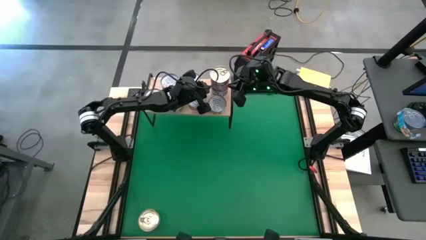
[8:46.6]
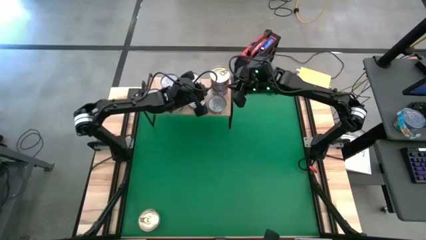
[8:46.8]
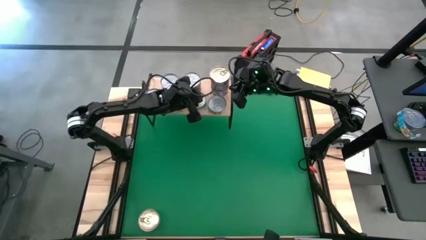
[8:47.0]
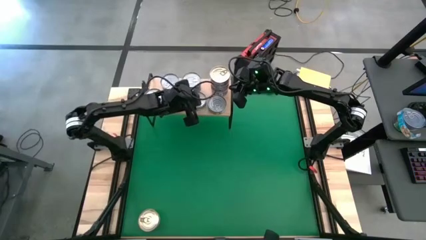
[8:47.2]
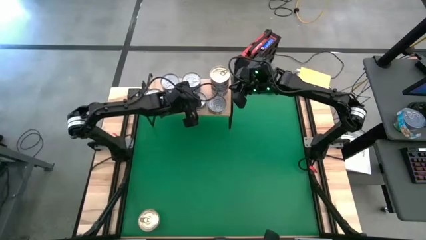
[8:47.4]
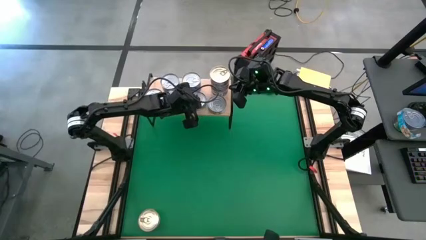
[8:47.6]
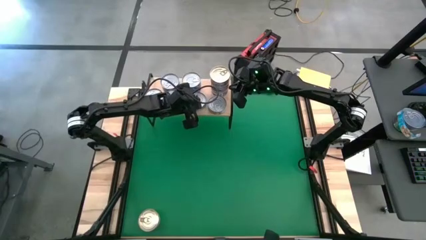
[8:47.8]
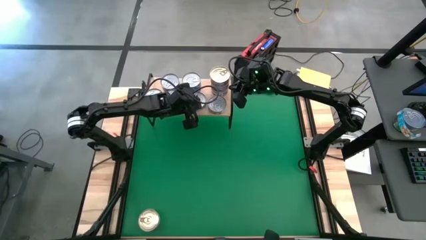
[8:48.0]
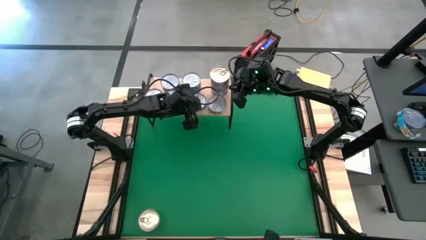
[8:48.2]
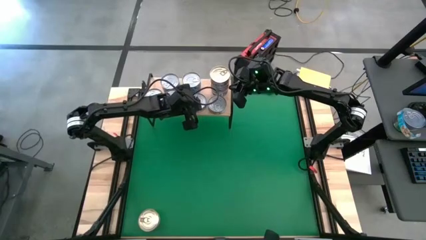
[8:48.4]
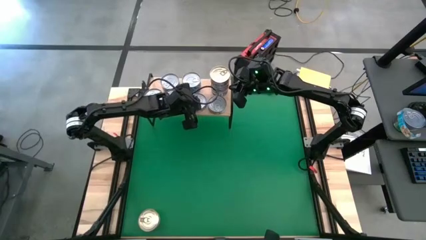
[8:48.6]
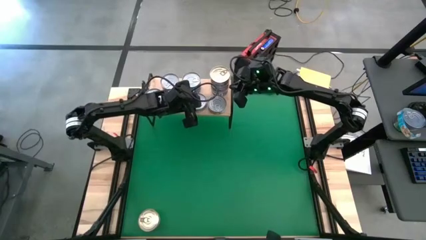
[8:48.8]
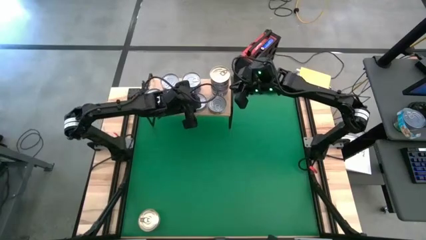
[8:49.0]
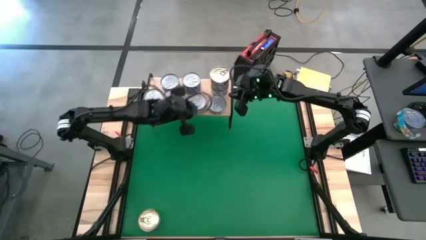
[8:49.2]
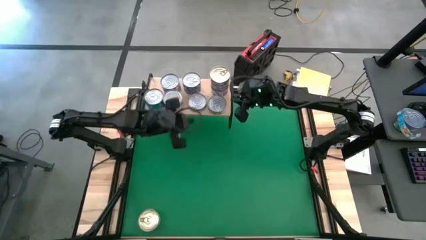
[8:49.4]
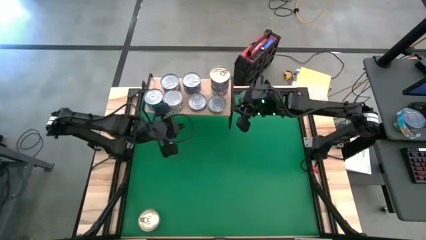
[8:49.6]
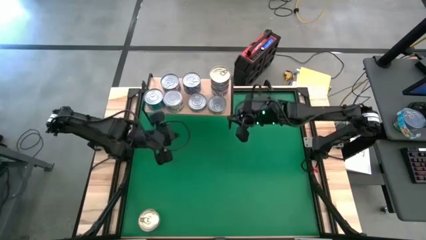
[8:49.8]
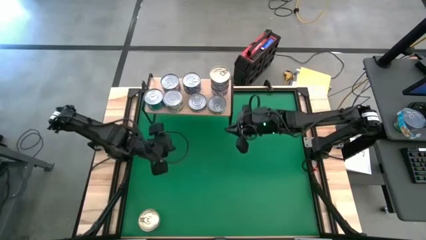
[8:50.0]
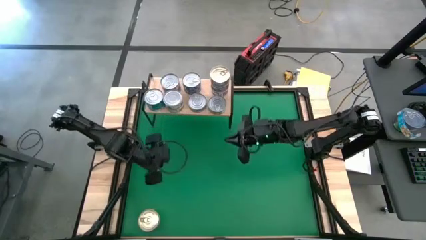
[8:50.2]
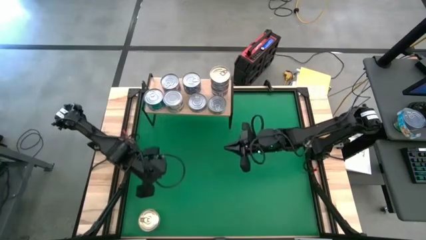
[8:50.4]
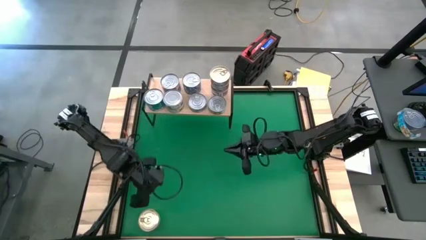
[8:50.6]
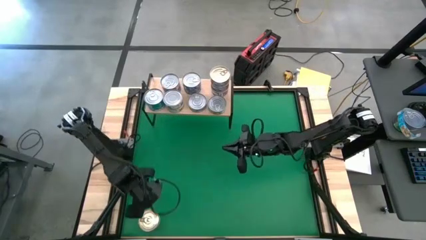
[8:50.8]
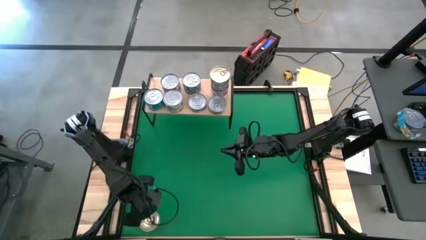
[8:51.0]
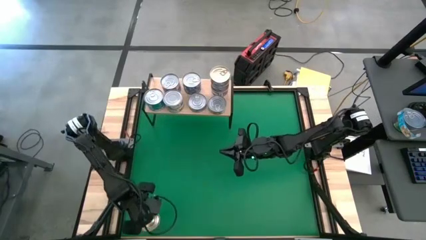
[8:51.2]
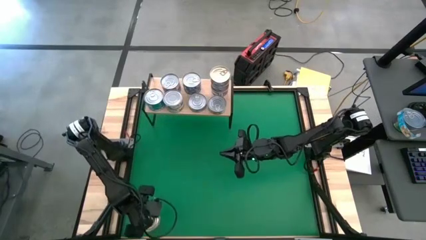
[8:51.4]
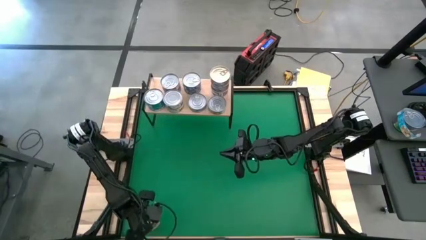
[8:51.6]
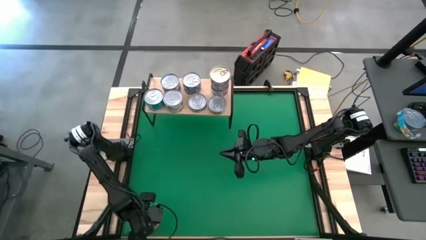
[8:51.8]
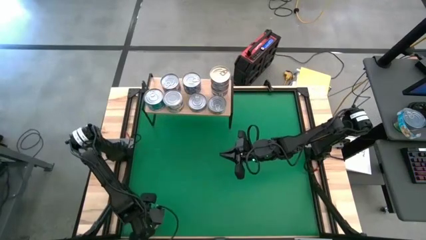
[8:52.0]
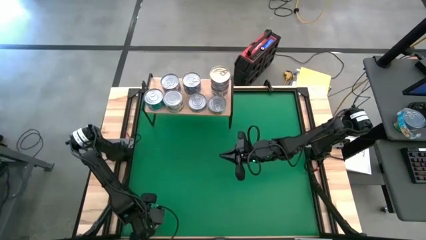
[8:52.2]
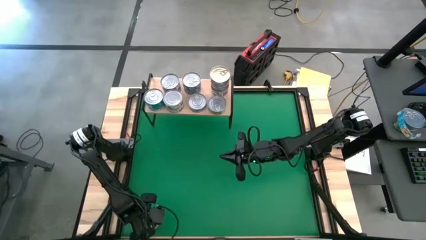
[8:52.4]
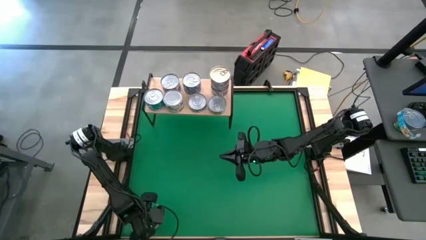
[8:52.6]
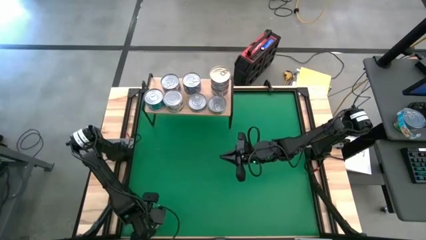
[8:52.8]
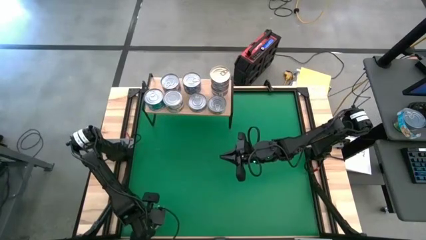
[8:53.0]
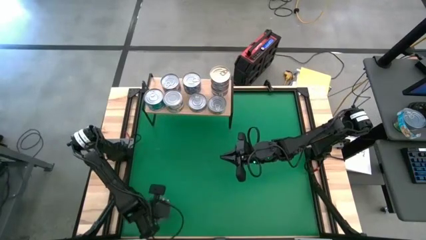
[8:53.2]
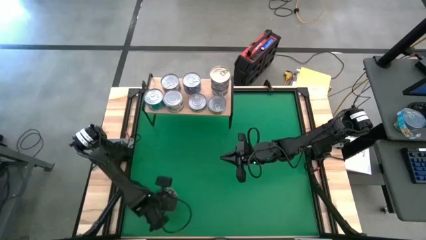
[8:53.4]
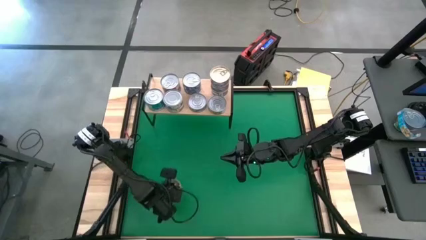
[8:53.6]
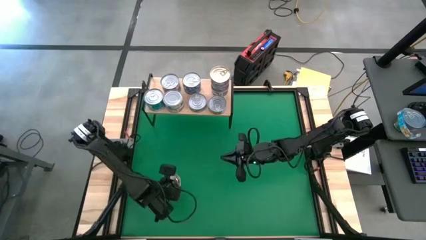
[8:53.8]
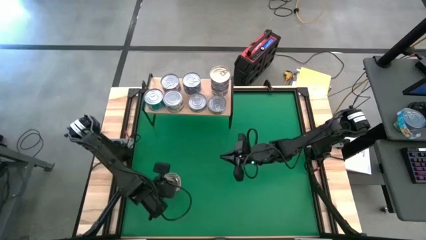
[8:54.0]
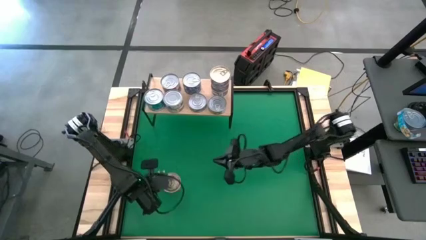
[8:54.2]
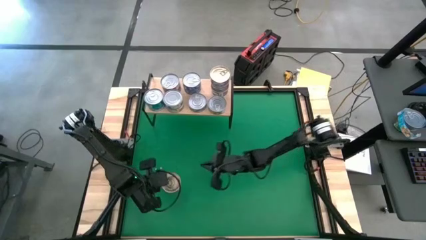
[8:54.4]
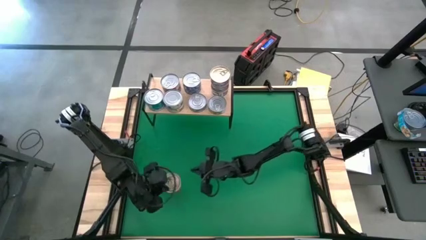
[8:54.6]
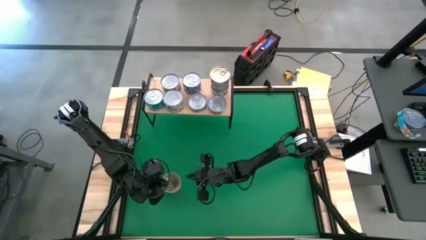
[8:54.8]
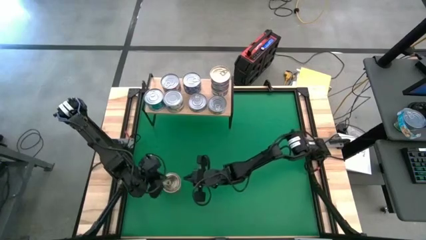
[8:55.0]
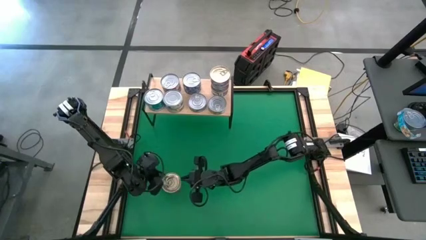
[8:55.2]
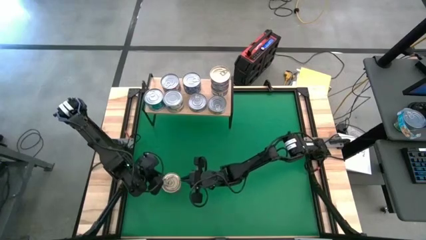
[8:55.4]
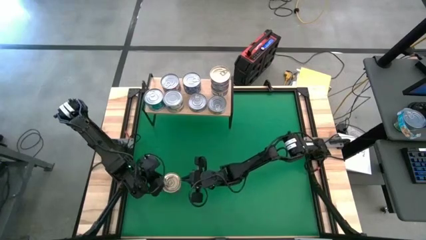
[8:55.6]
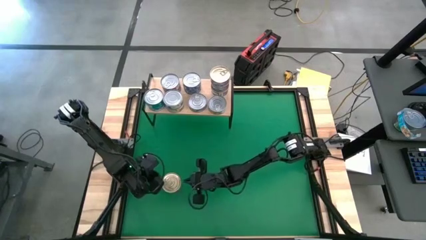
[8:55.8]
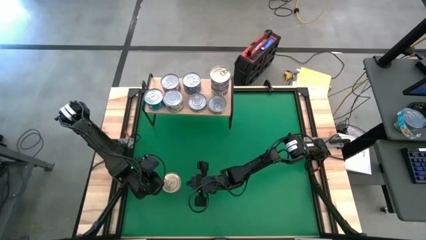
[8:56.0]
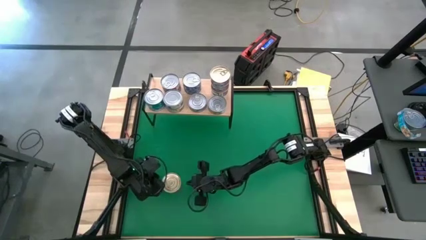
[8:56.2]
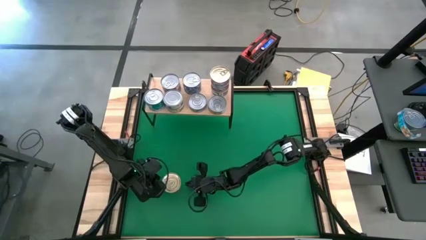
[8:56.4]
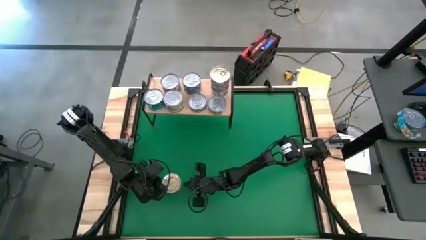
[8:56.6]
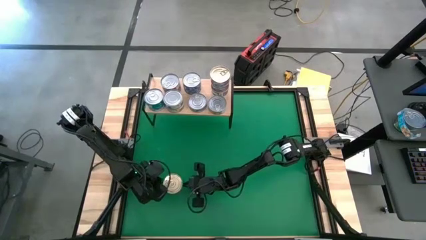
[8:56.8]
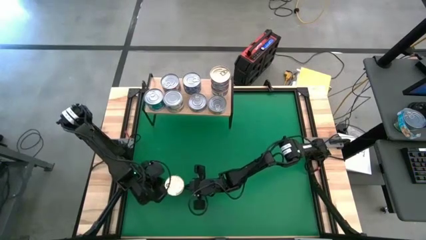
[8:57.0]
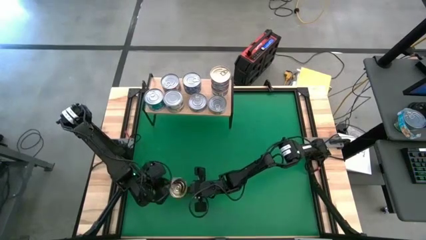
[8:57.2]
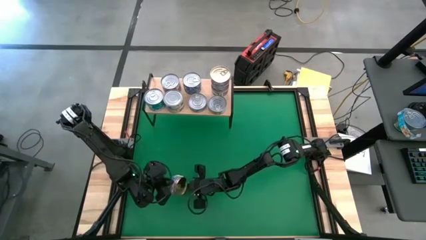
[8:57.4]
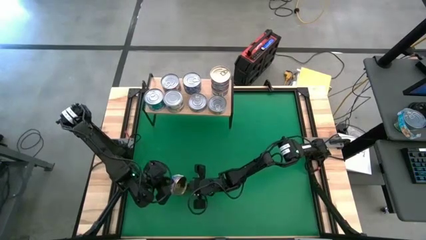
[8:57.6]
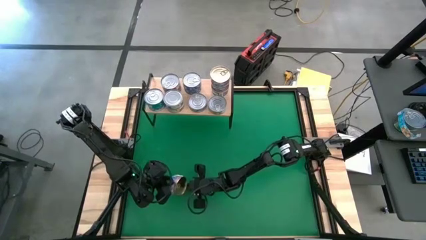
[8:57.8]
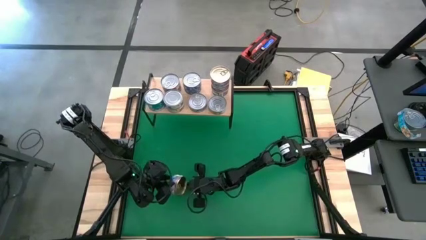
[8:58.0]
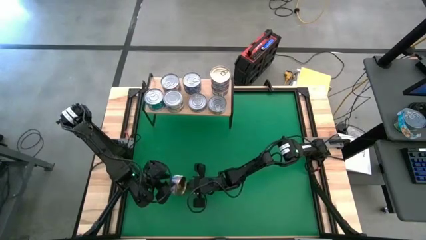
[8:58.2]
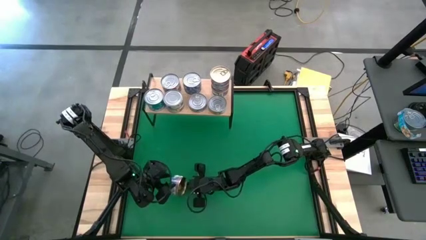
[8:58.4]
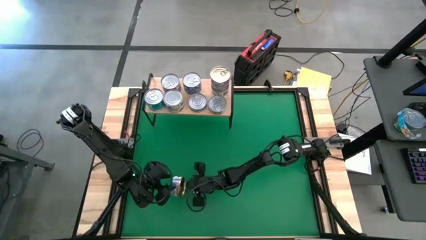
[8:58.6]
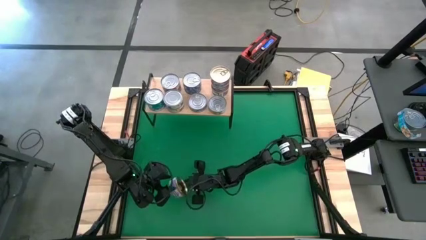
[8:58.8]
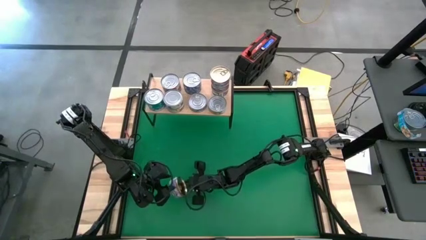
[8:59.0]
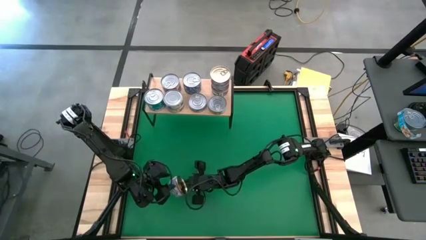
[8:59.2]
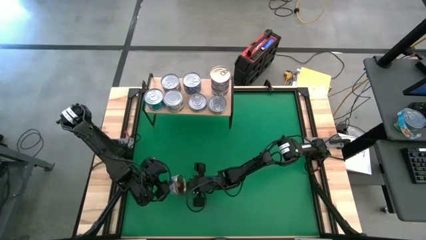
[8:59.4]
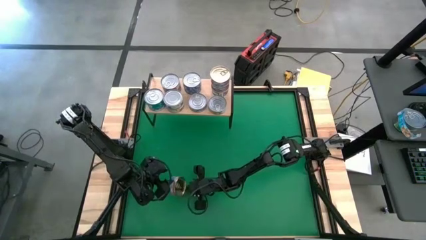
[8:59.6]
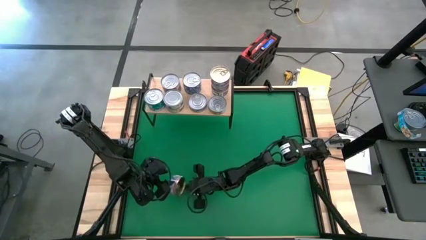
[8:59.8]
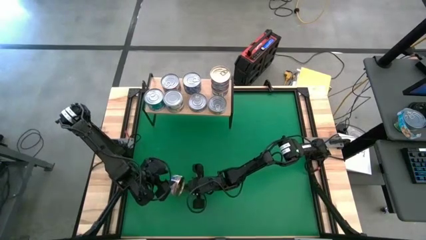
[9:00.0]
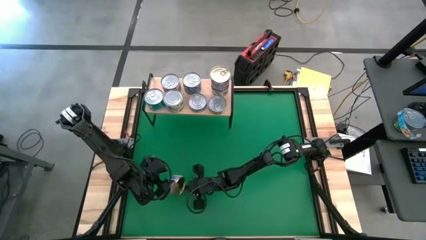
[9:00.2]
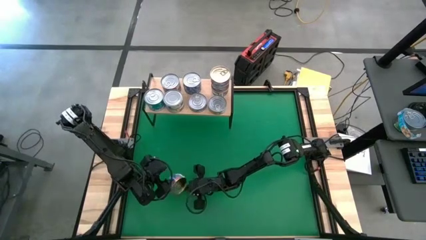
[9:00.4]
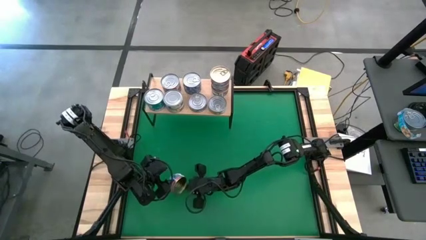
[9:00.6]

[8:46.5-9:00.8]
Task: Stack canned seafood by type on shelf
Stack the blue tuna can on top of the blue tuna can on the shelf
